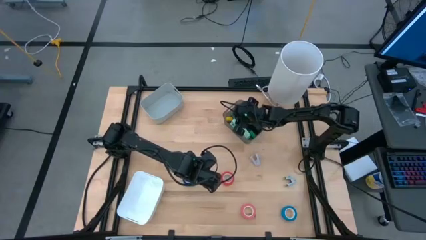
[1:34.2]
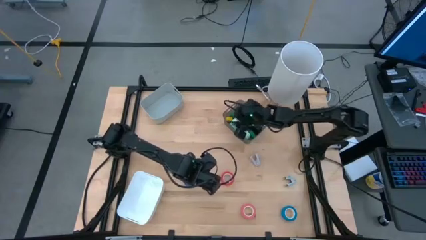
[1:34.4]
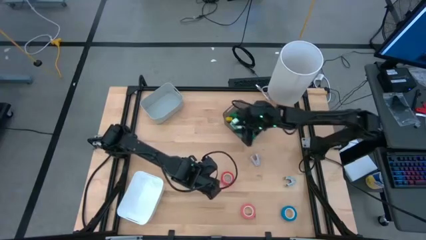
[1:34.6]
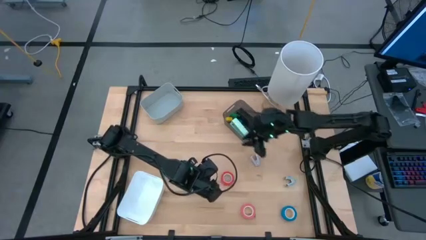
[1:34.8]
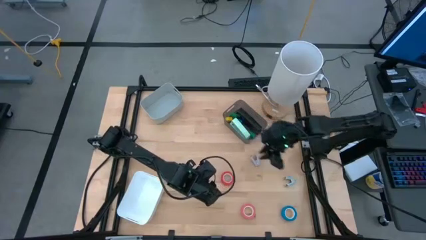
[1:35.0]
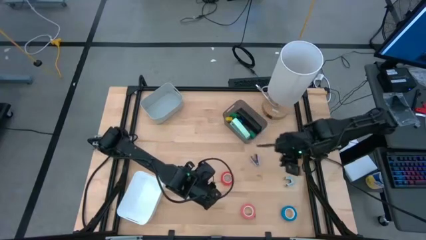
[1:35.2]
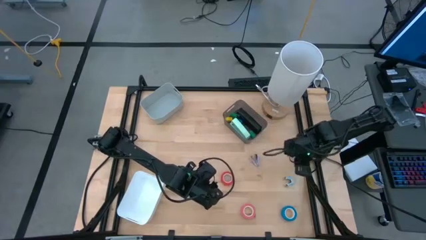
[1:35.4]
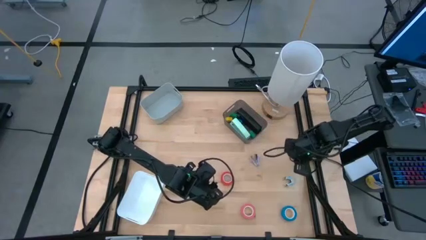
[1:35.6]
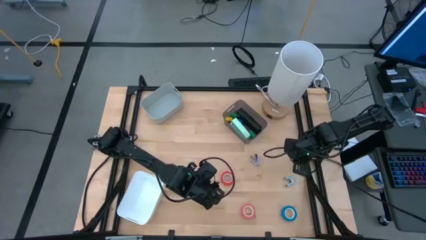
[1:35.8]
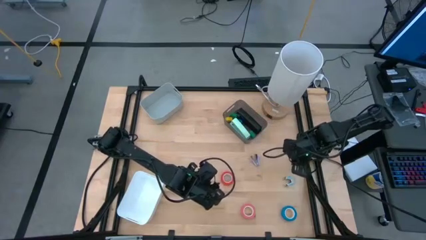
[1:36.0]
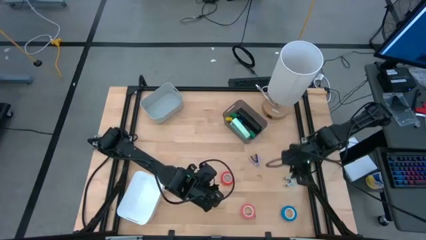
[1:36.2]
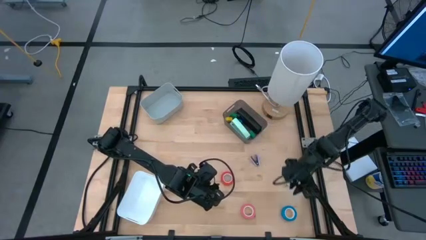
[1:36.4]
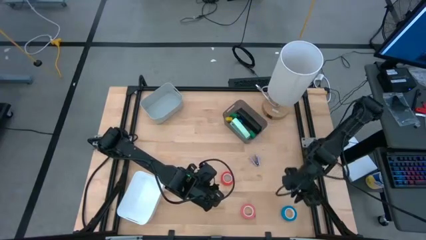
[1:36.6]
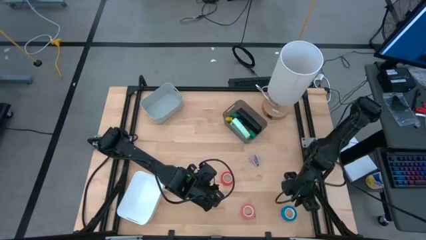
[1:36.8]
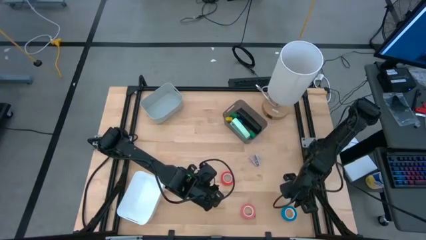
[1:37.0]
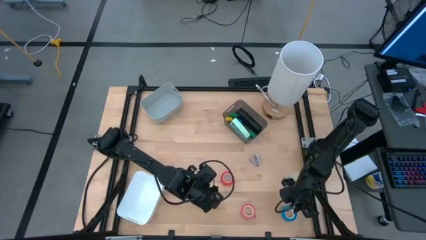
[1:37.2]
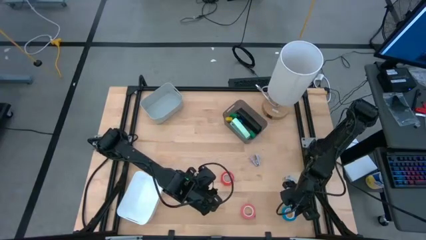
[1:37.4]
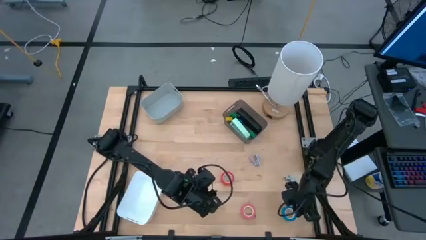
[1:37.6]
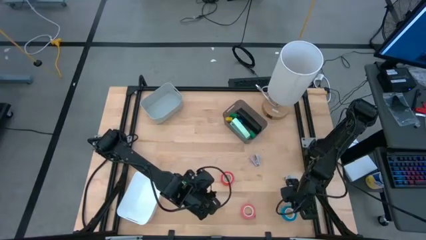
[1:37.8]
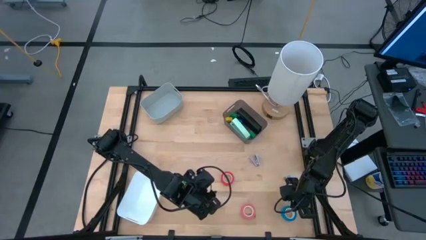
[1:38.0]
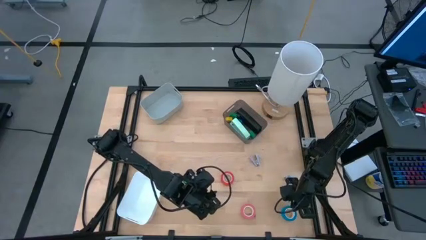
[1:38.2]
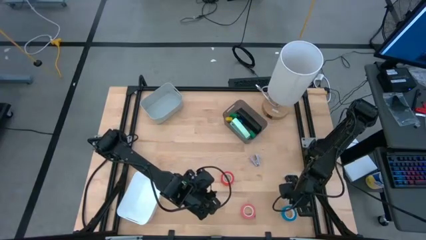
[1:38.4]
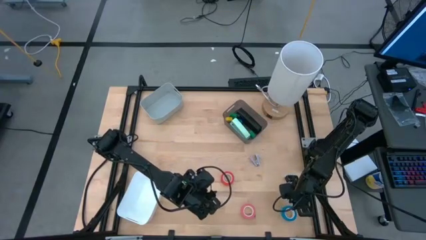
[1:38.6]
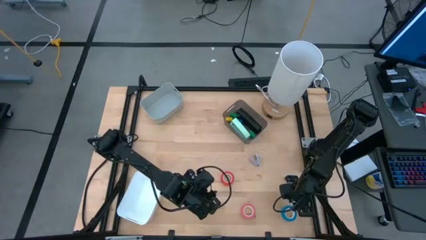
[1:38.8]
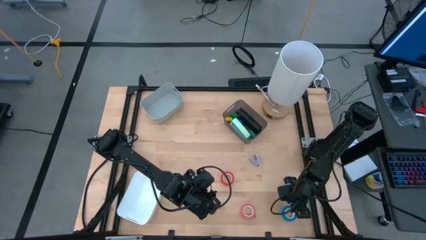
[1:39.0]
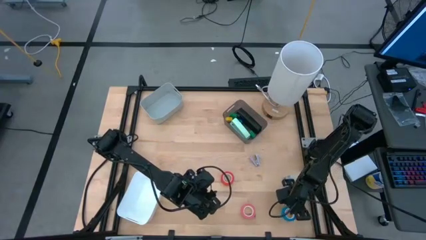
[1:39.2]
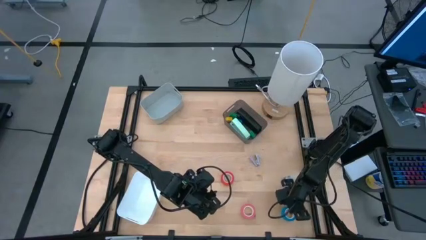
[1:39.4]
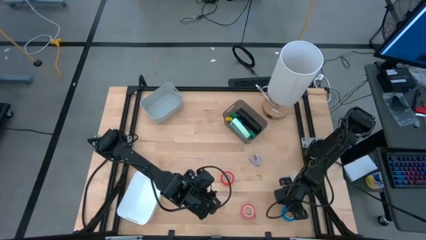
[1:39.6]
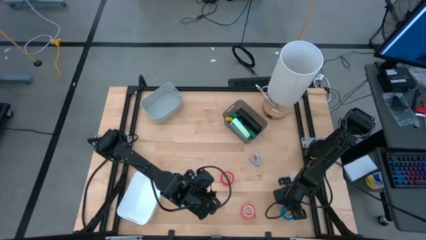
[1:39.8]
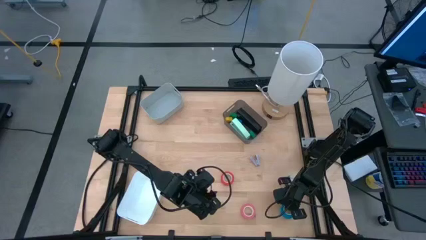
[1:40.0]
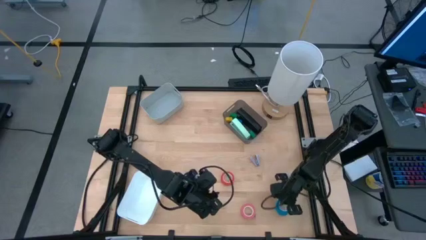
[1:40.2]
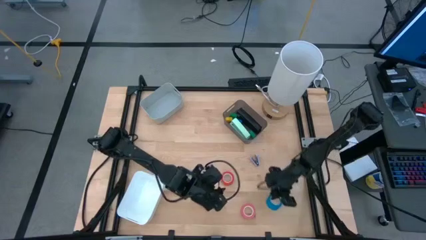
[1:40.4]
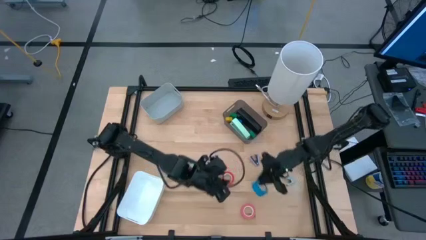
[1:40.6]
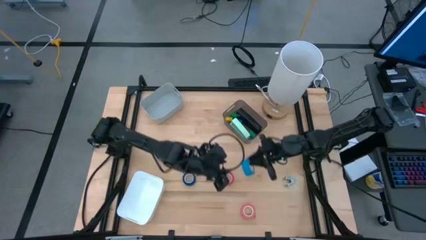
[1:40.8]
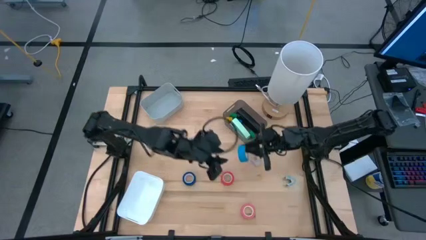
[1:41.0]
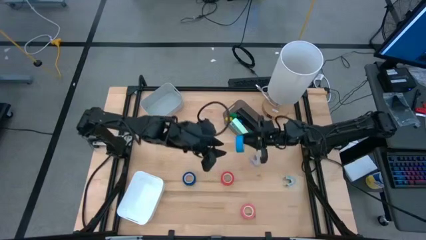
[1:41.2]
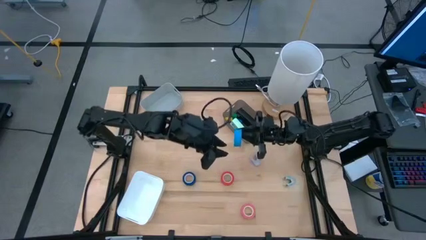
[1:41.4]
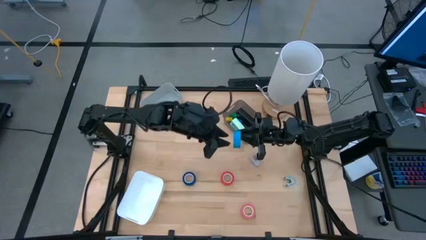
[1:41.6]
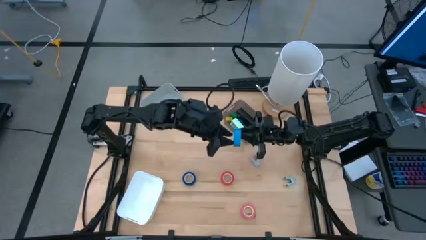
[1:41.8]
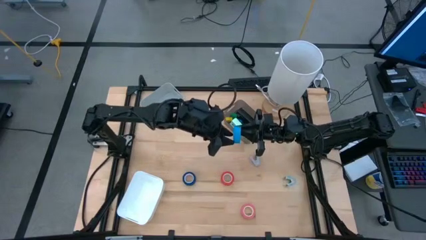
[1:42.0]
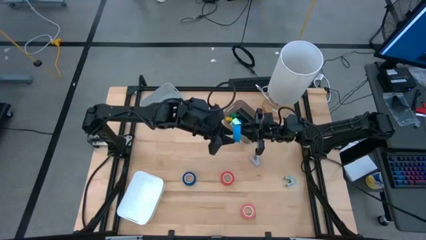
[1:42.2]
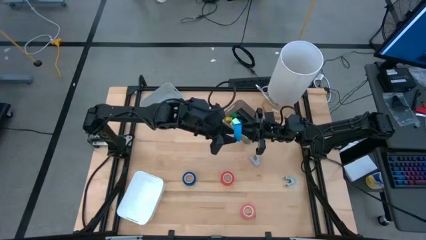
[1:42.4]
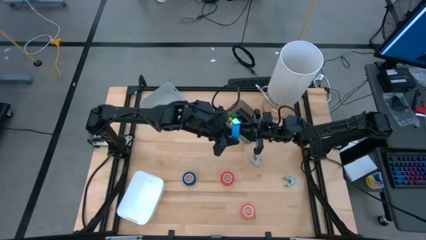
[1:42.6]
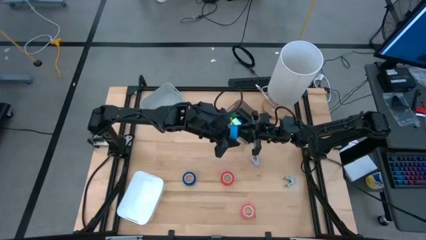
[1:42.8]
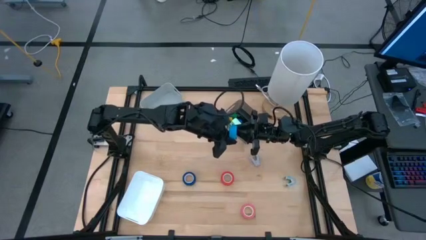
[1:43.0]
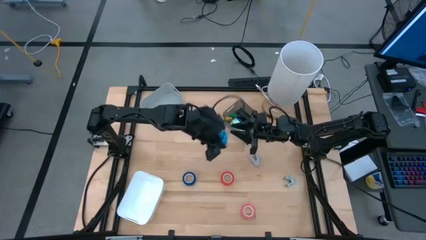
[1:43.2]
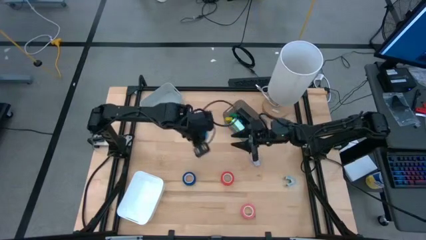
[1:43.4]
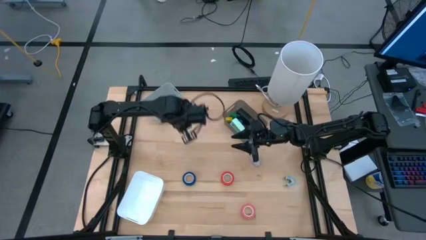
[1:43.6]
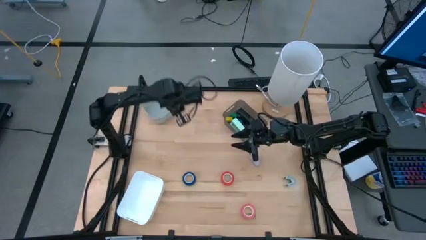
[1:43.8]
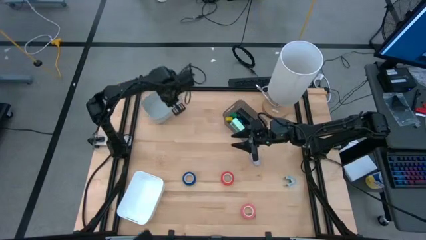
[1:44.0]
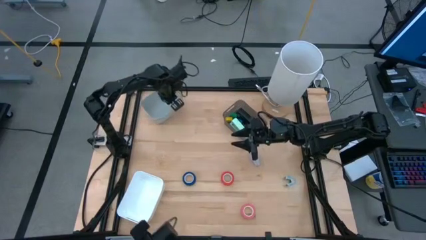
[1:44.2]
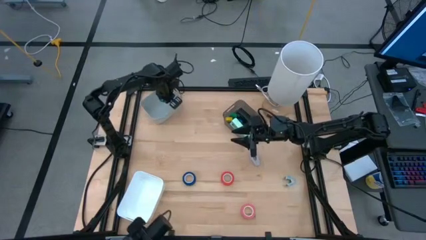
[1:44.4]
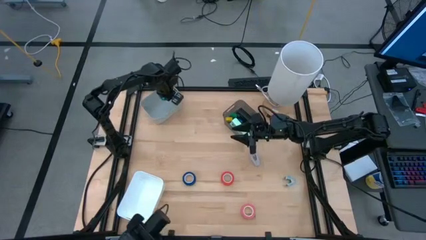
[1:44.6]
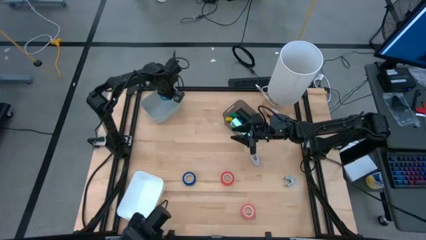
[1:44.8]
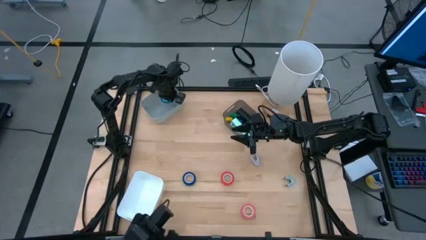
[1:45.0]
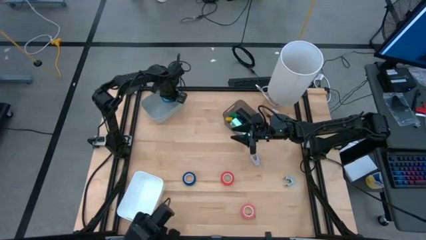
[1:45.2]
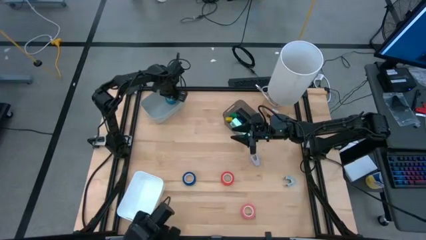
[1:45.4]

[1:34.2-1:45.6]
Task: Pick and place Stapler, Stapler remover, tape
Put the light blue tape into the gray bin

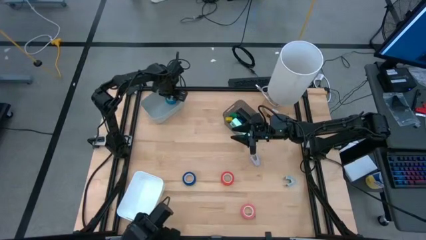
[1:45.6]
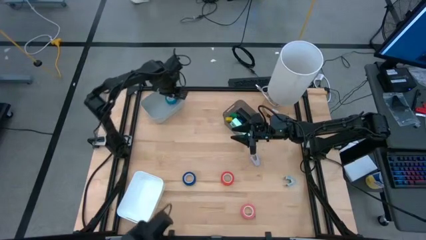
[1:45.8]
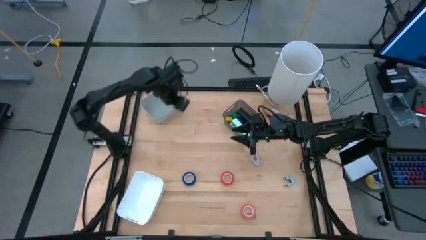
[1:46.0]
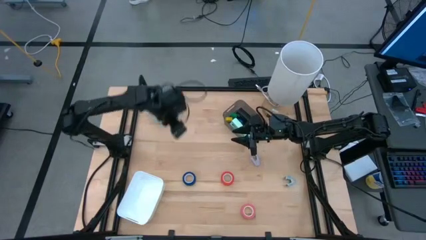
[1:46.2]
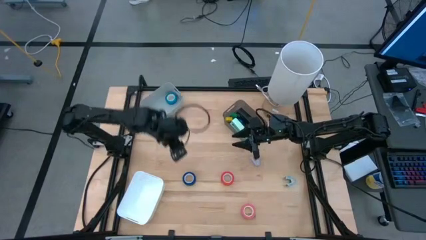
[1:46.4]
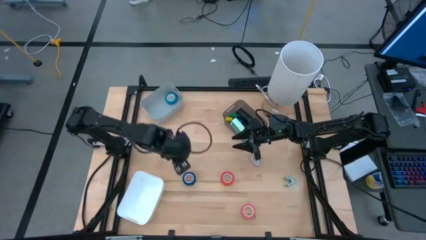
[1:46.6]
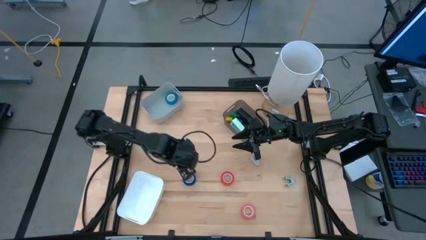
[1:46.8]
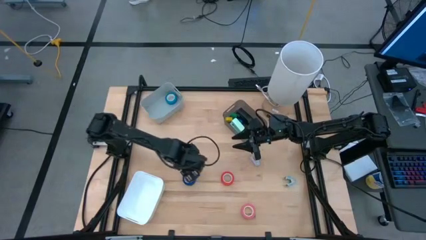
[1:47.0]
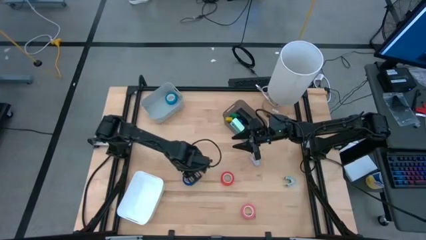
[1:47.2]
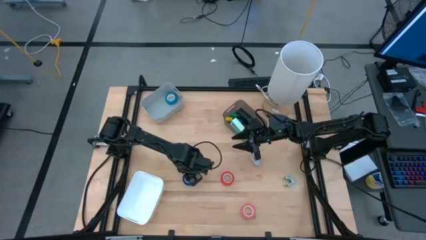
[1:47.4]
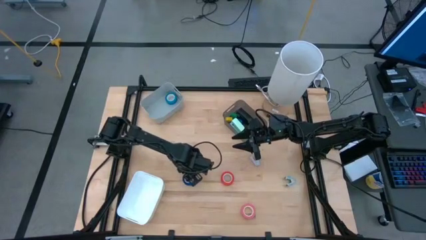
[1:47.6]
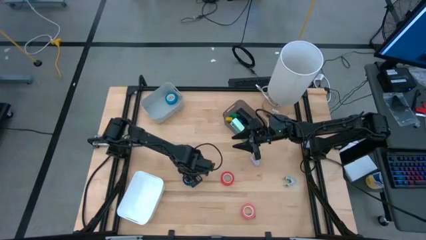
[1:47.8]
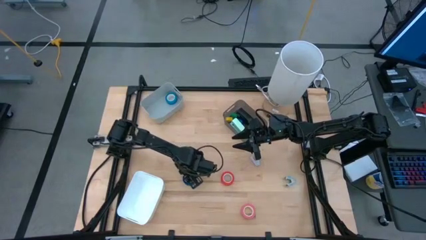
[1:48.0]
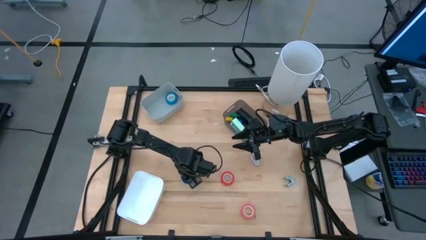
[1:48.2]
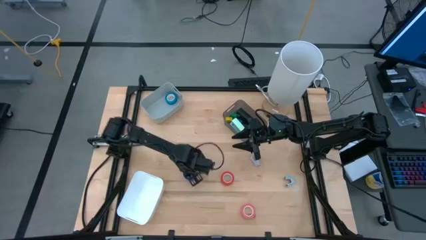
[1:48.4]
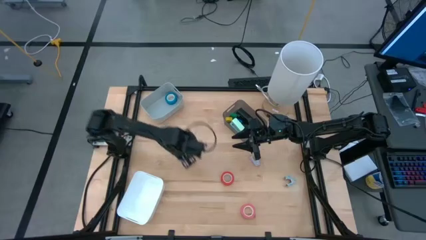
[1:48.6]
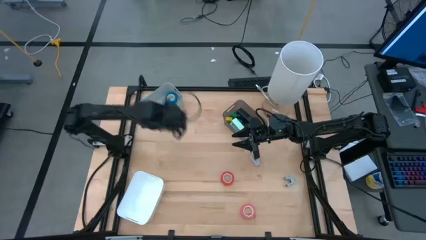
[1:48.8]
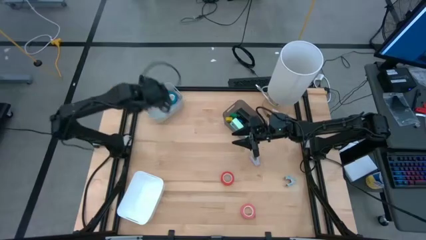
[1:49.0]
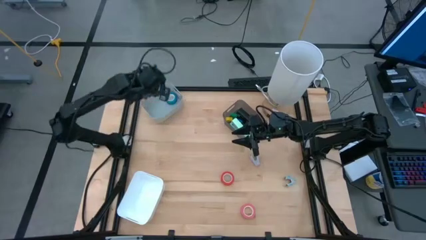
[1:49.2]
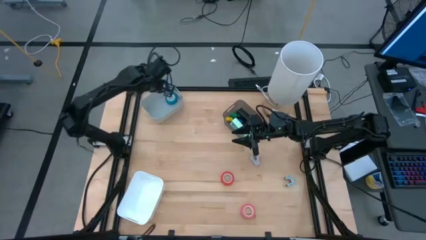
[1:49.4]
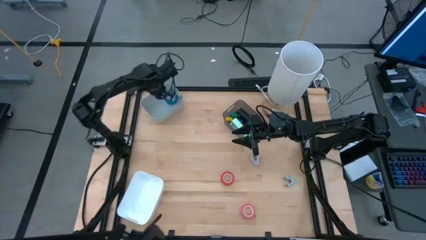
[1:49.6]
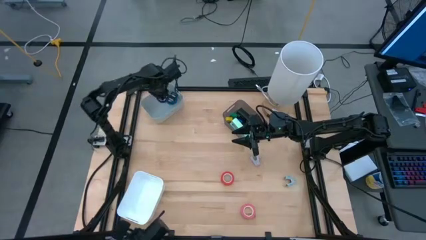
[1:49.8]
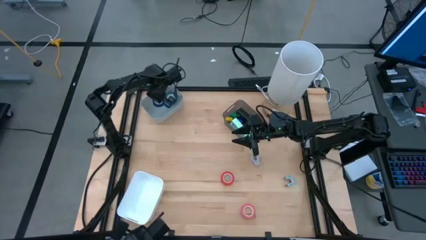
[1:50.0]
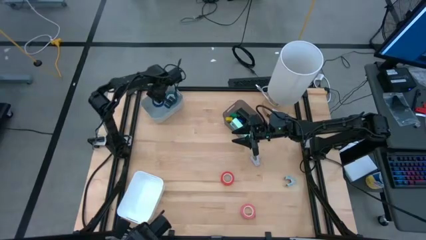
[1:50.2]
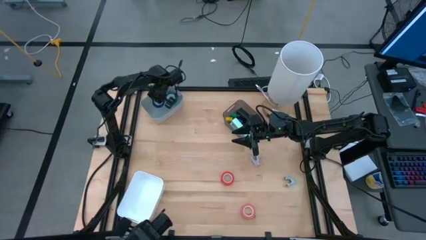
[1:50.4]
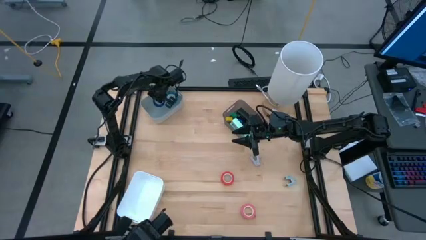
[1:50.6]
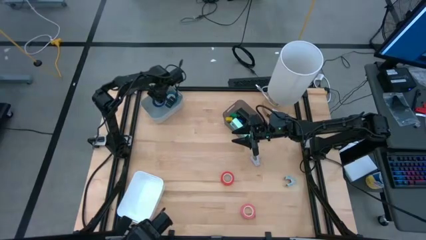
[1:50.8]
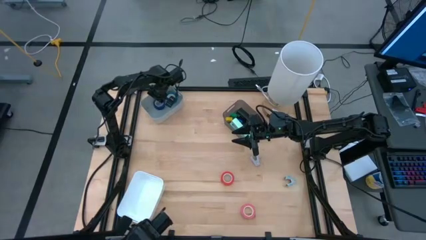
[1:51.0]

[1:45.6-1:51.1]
Put the blue tape into the gray bin

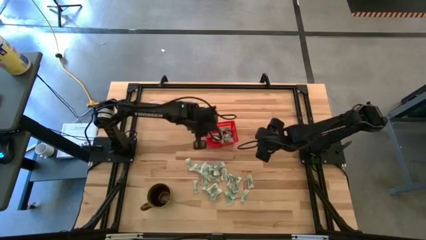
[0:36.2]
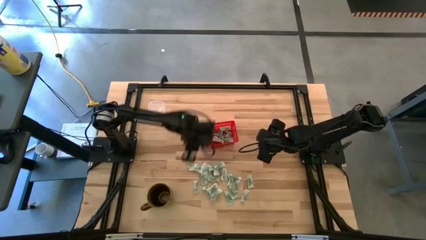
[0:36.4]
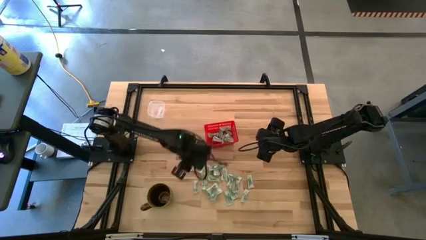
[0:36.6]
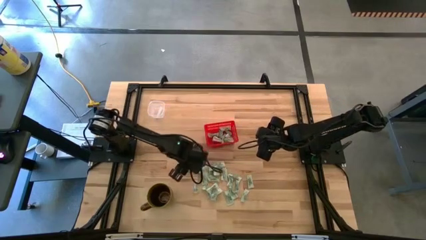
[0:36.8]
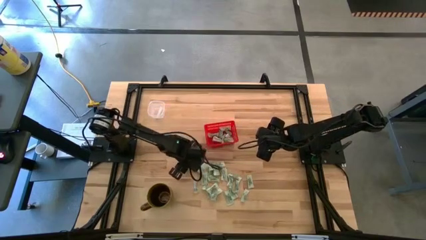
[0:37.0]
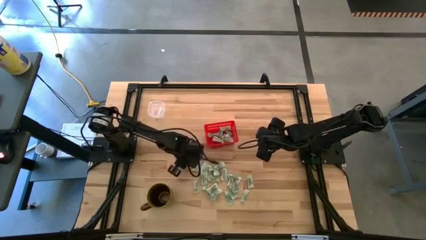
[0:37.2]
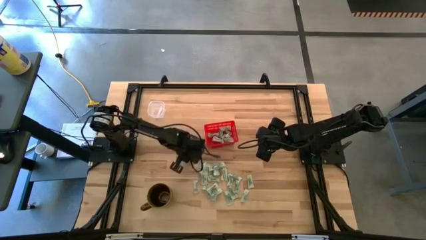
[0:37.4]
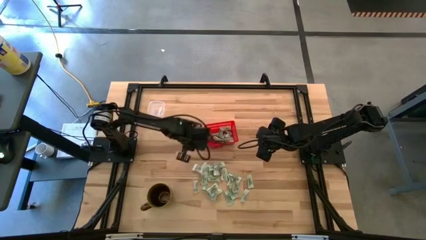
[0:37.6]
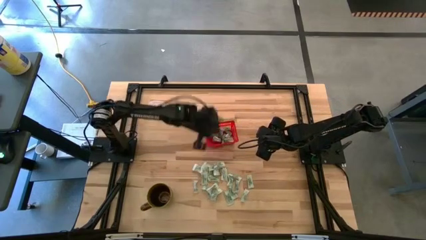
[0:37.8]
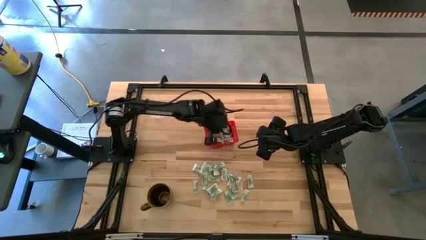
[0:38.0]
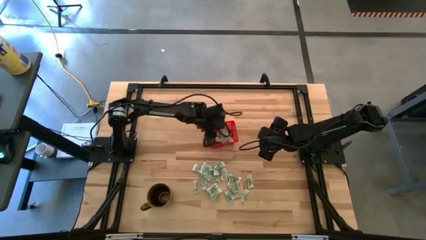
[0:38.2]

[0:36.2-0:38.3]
Task: Pick and place items into bin
Put the green stevia packet into the red bin
